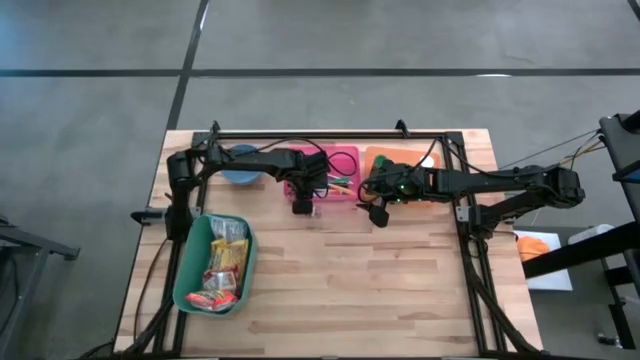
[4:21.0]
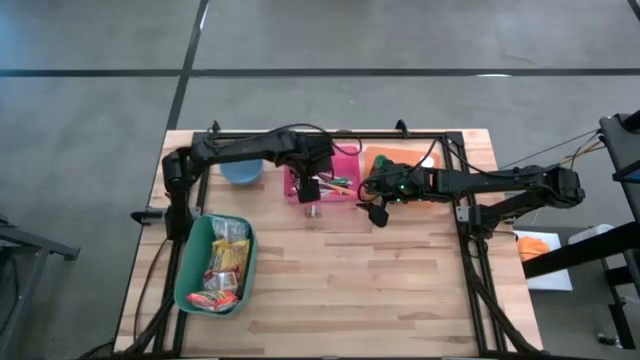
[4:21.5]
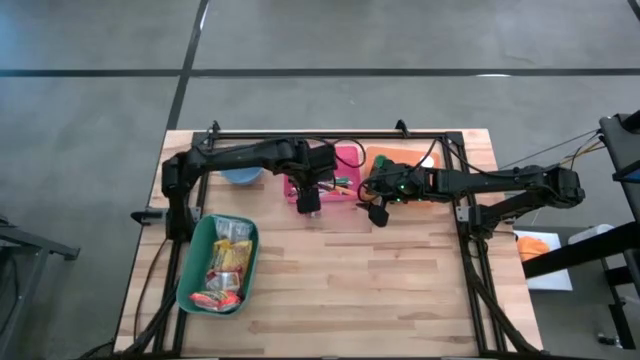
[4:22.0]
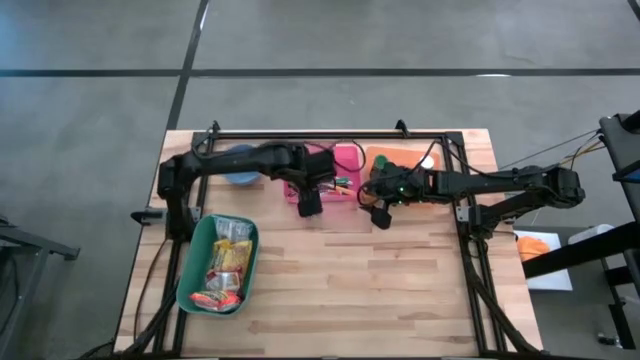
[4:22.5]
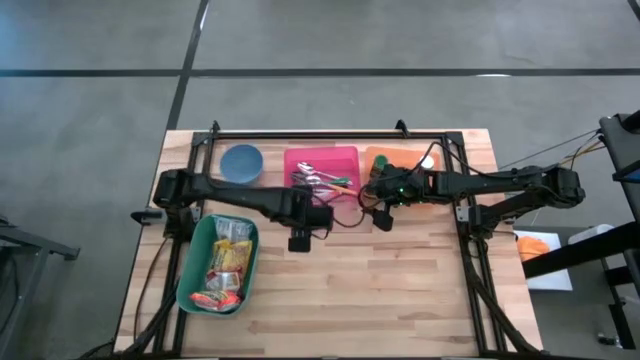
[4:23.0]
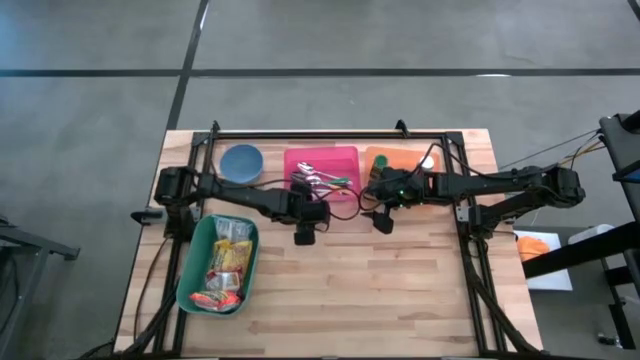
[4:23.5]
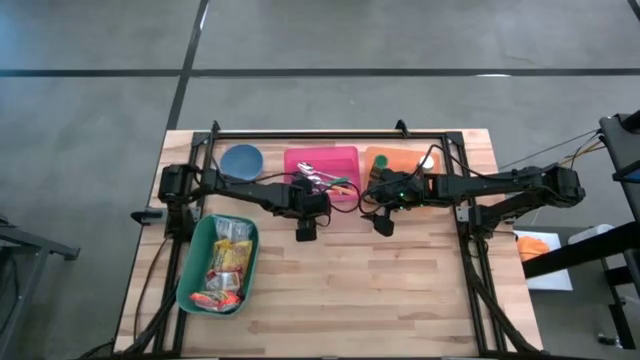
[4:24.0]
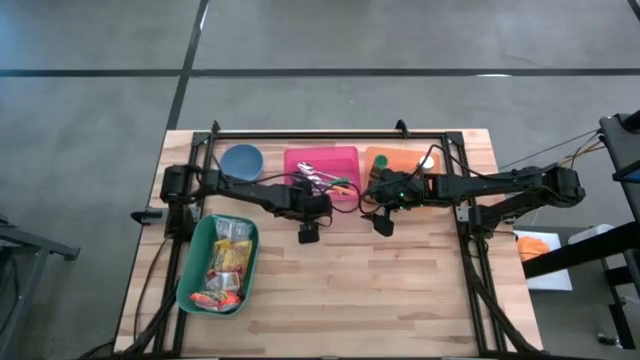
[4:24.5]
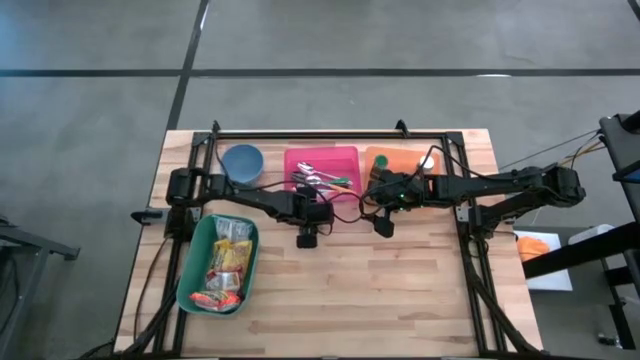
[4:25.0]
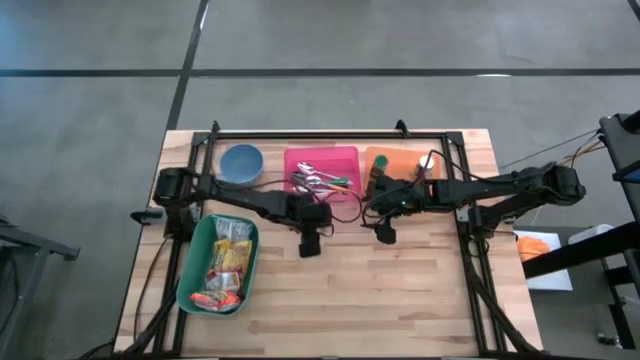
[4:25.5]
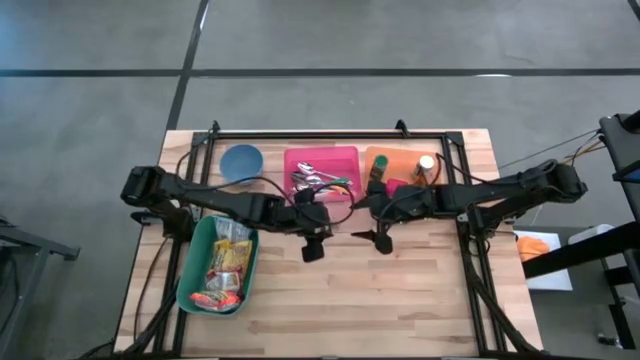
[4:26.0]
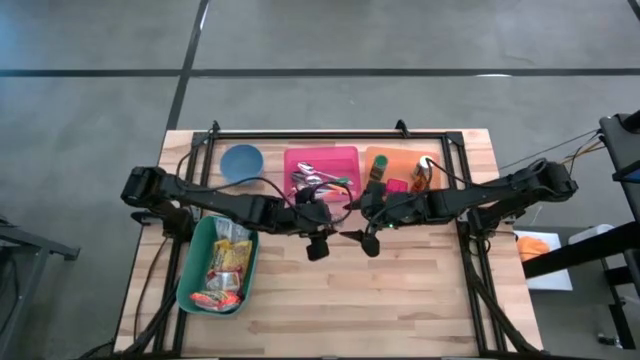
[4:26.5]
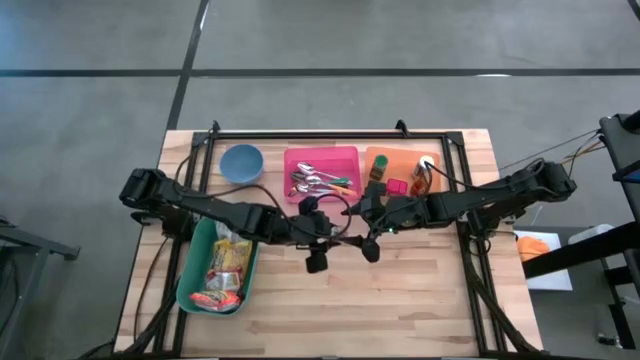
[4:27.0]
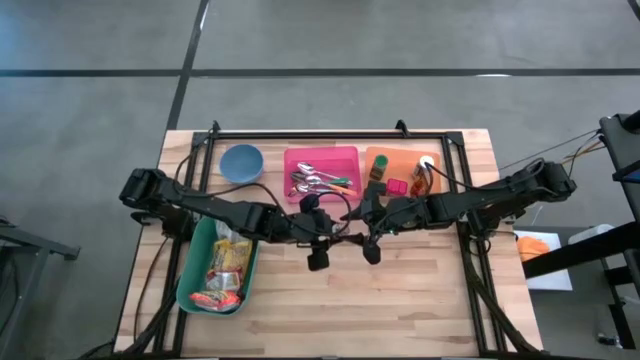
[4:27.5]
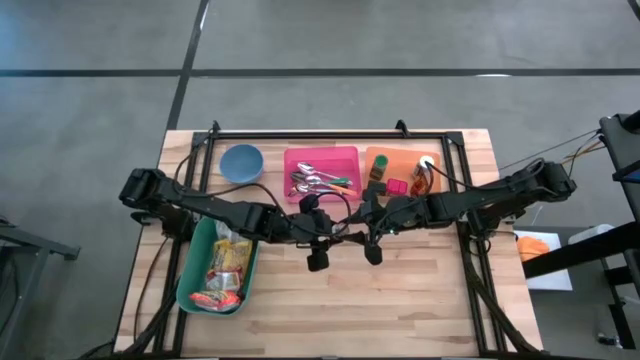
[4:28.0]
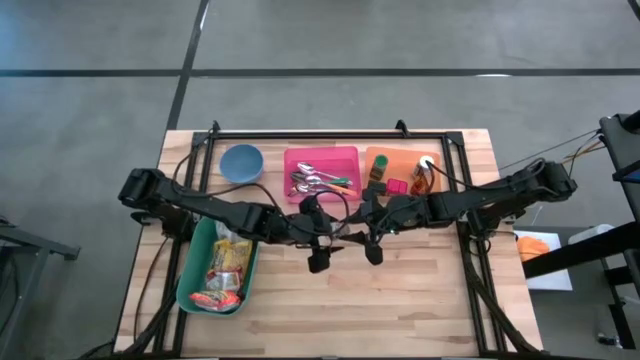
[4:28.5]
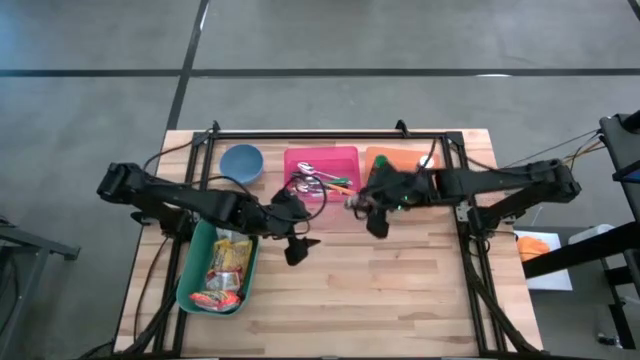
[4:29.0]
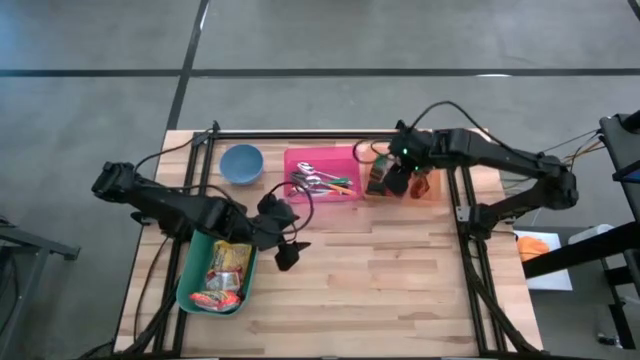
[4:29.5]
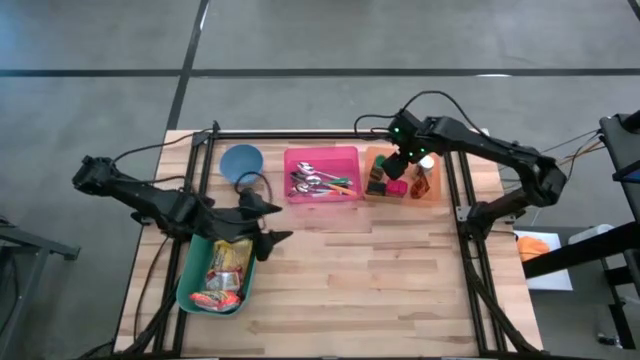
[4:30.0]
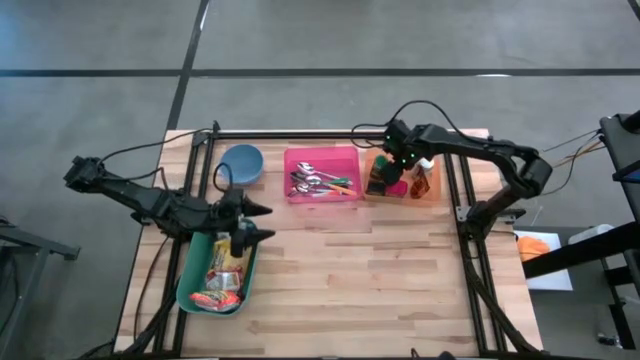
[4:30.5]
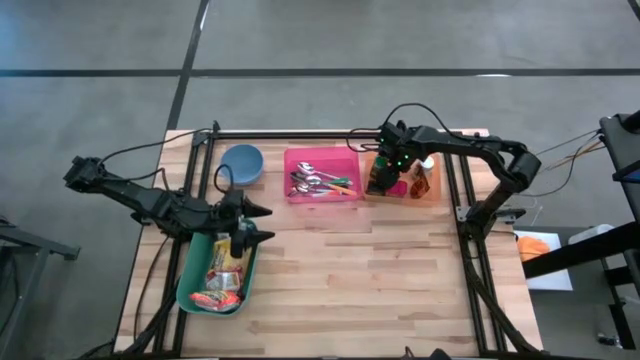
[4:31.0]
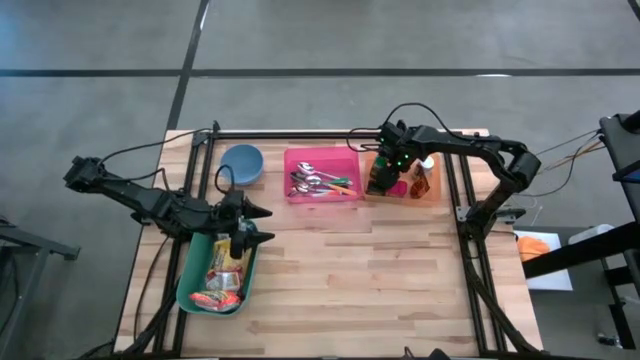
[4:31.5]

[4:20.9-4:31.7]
Put the brown spice bottle into the orange bin

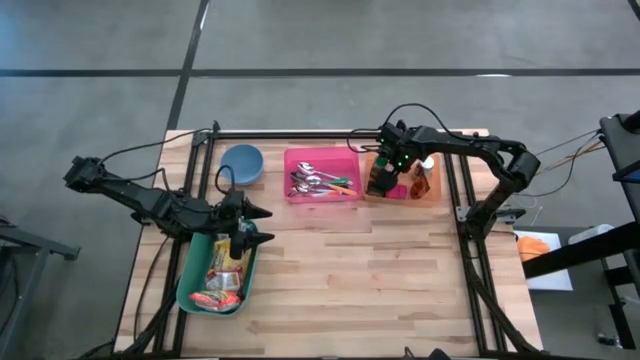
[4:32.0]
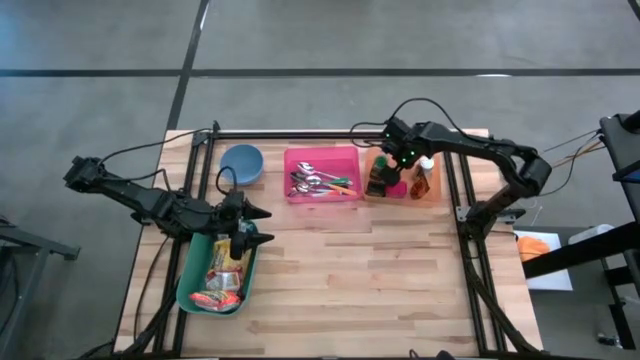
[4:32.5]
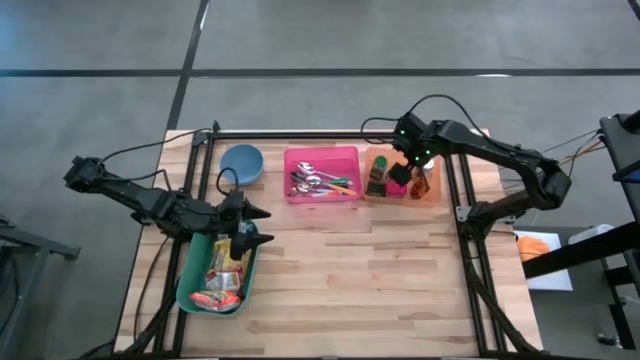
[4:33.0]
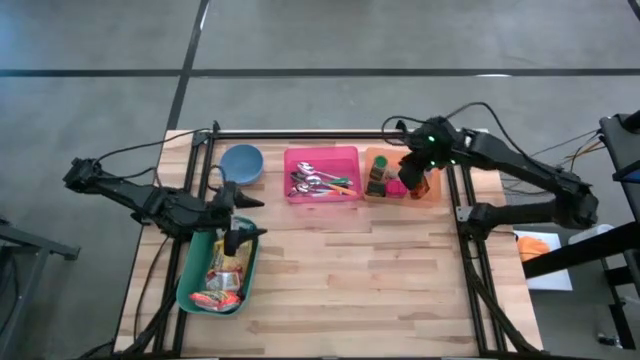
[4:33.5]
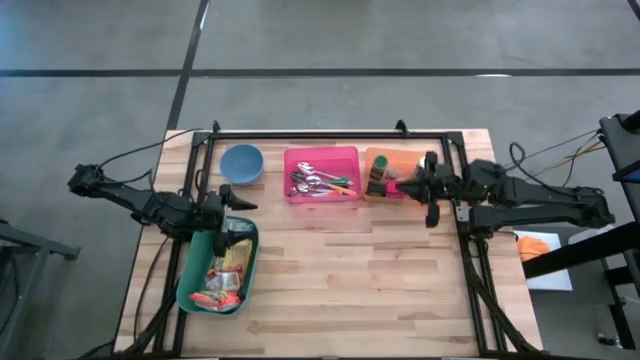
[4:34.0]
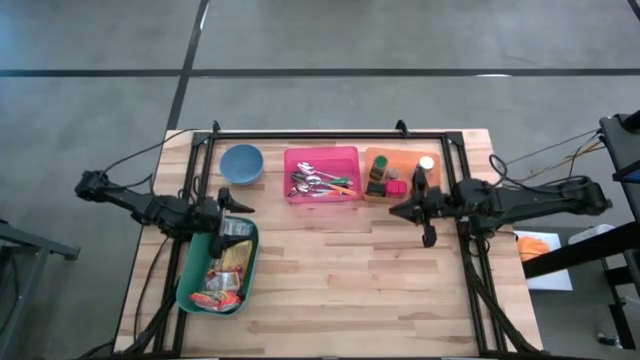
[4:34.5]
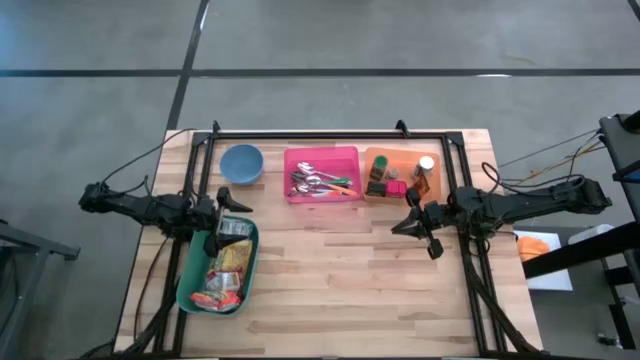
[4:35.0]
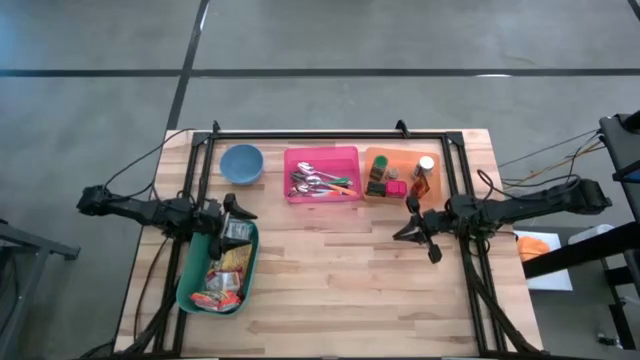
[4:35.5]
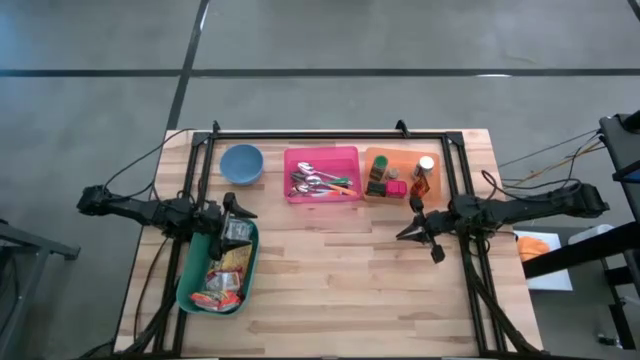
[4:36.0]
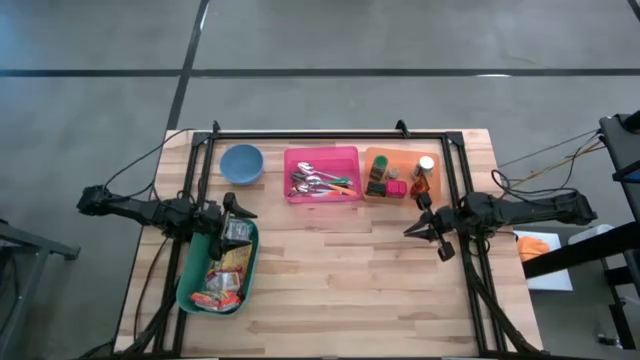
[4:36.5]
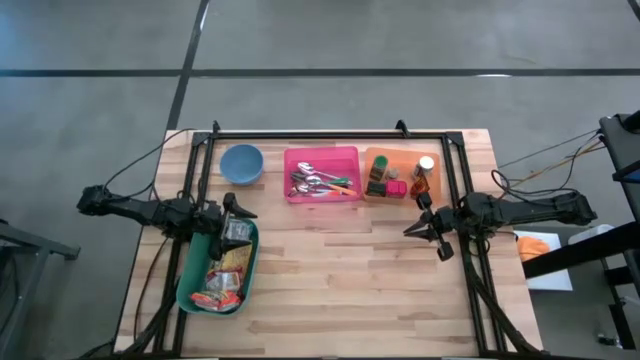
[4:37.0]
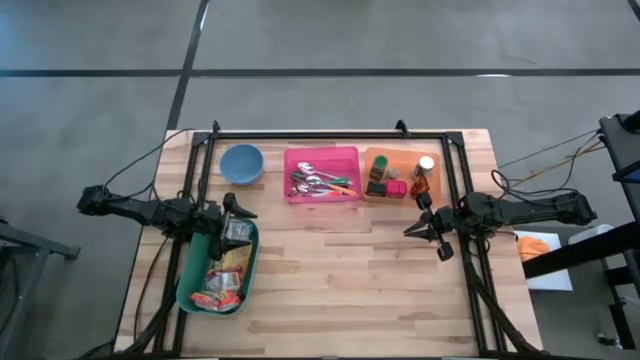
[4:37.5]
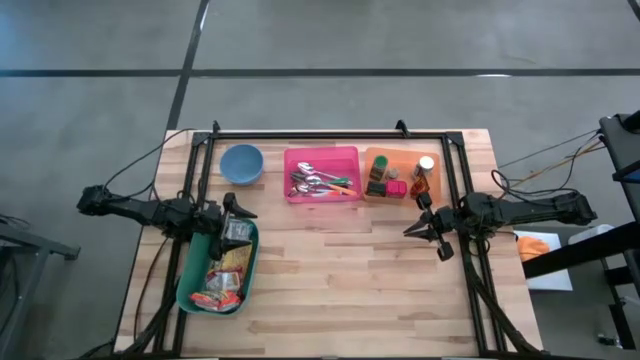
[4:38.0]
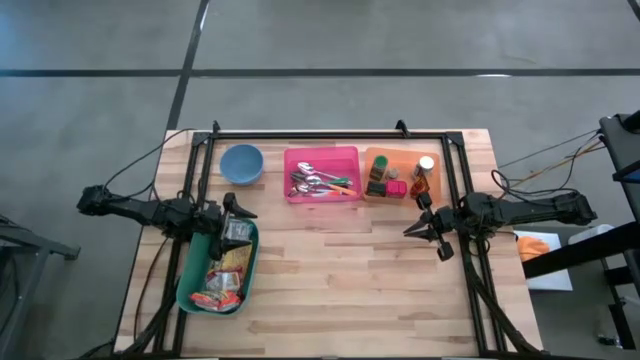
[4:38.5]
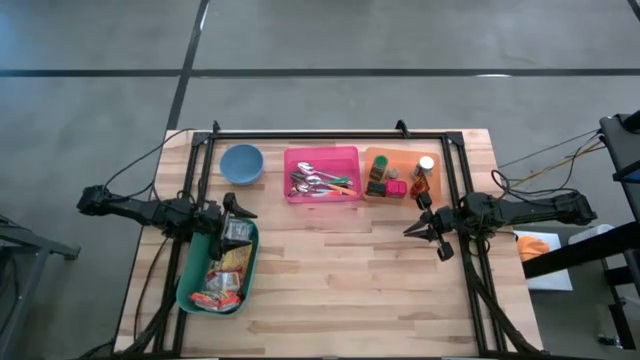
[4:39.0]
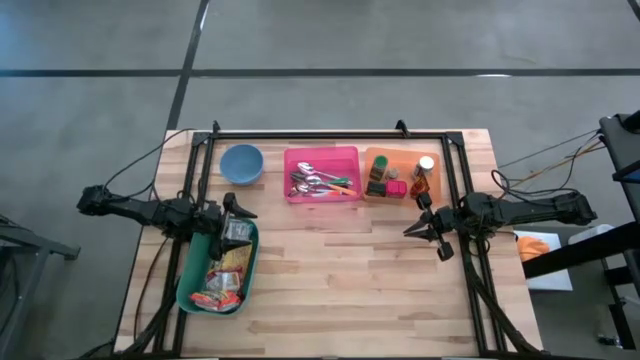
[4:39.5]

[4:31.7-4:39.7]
Return to Home Position
